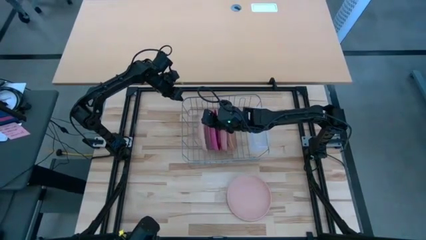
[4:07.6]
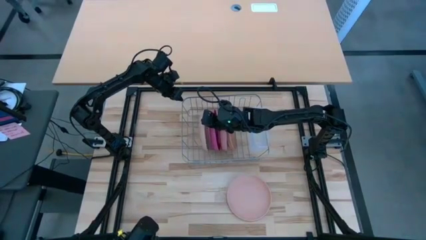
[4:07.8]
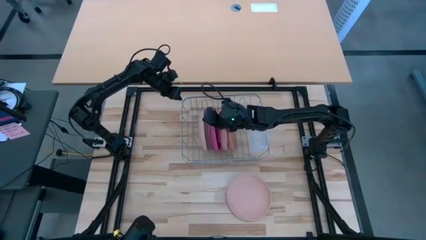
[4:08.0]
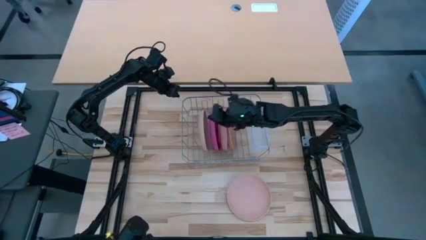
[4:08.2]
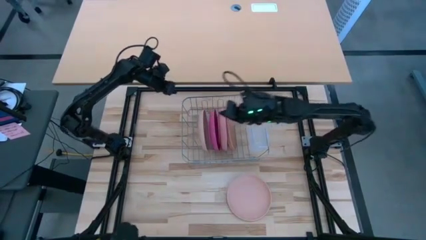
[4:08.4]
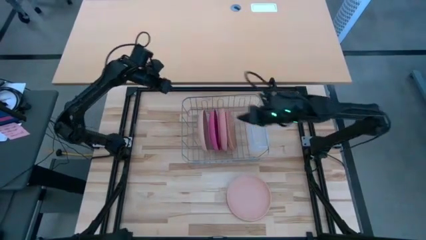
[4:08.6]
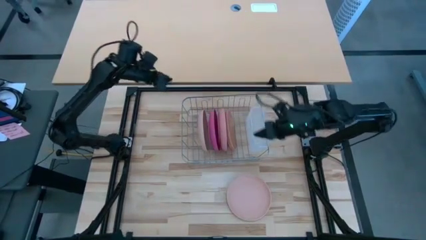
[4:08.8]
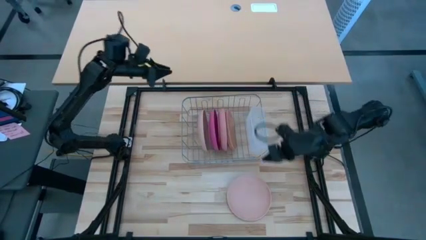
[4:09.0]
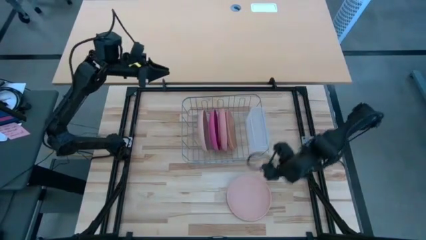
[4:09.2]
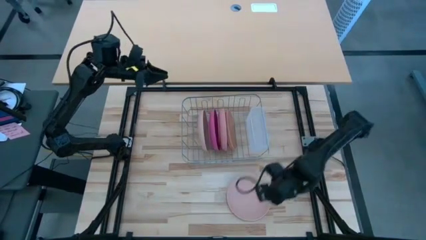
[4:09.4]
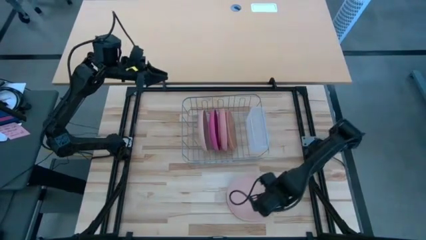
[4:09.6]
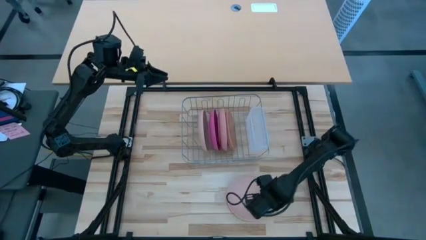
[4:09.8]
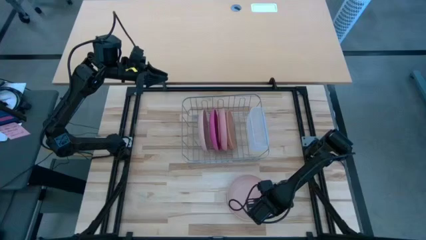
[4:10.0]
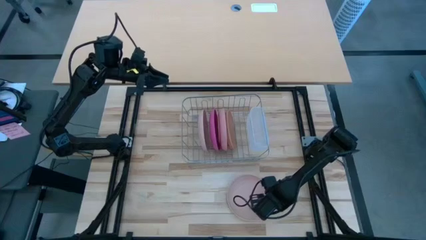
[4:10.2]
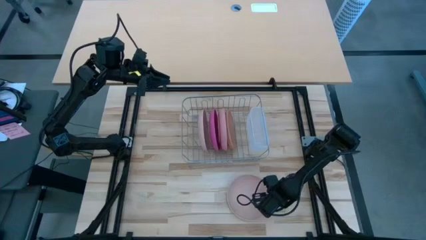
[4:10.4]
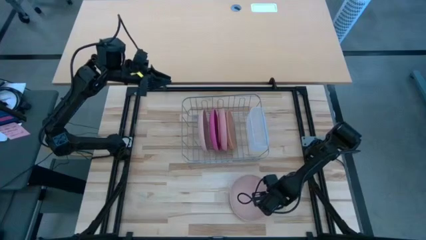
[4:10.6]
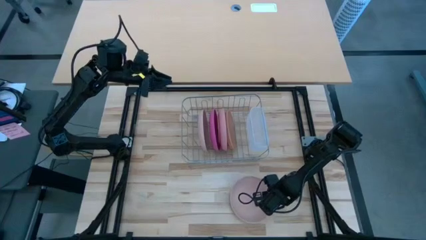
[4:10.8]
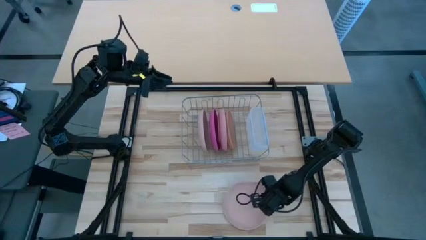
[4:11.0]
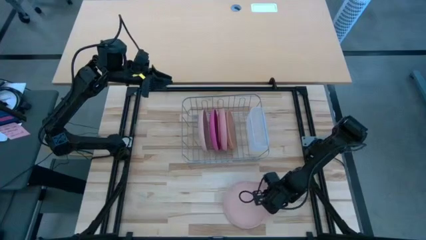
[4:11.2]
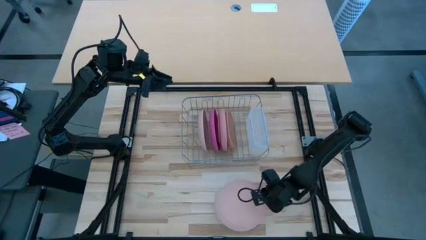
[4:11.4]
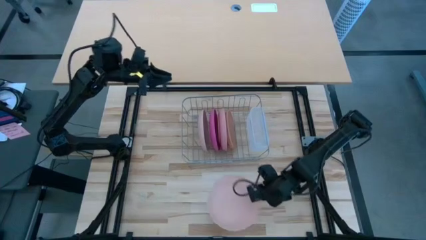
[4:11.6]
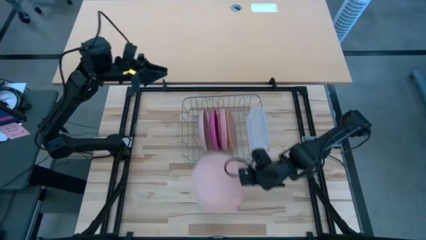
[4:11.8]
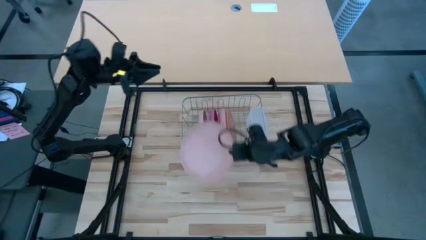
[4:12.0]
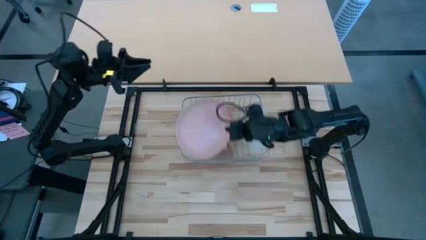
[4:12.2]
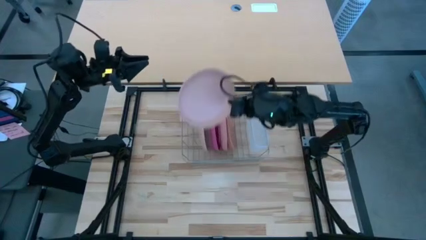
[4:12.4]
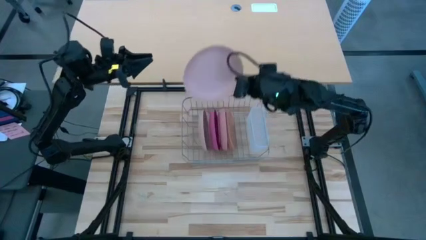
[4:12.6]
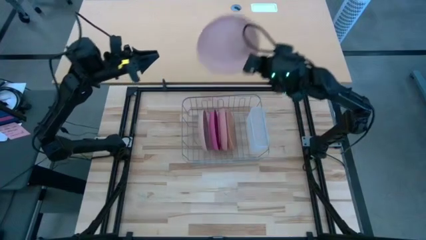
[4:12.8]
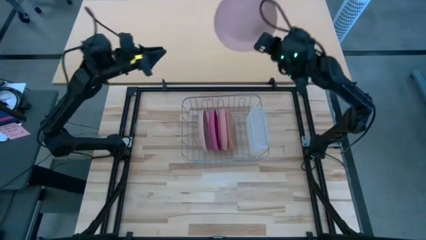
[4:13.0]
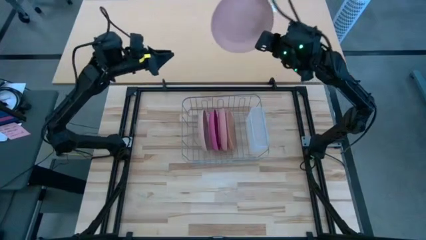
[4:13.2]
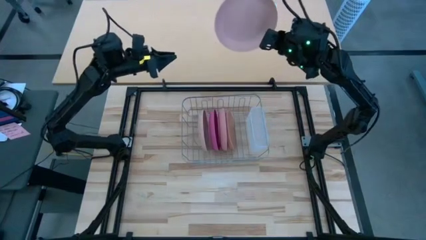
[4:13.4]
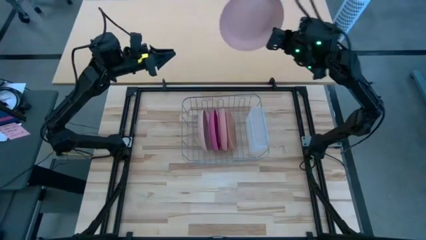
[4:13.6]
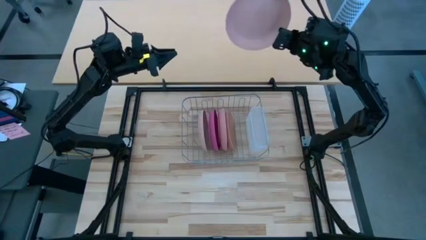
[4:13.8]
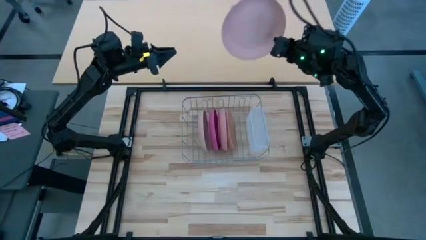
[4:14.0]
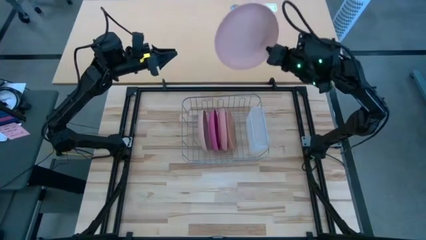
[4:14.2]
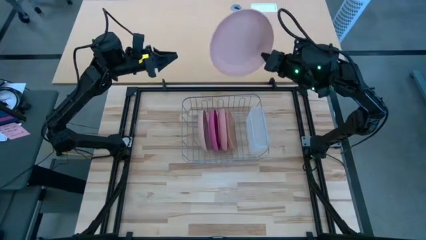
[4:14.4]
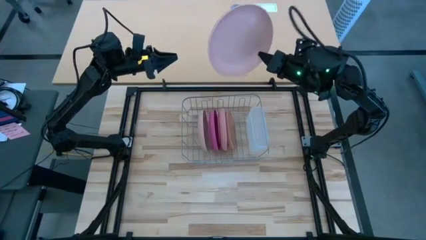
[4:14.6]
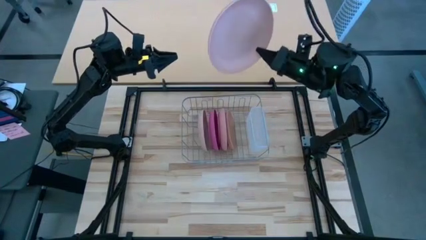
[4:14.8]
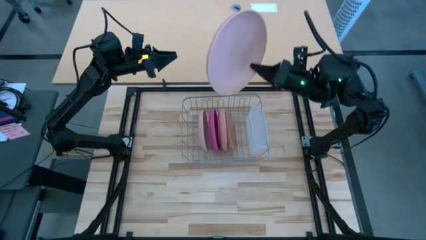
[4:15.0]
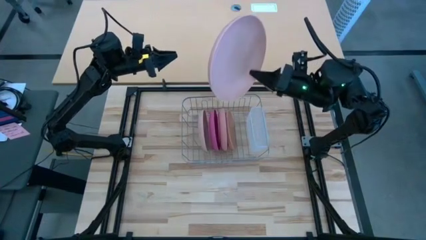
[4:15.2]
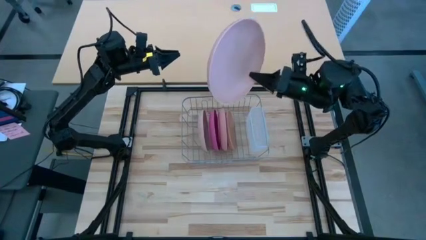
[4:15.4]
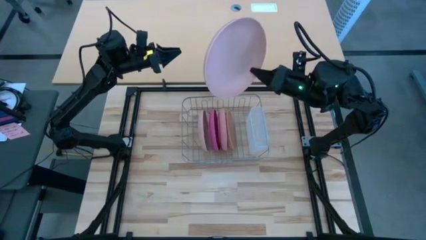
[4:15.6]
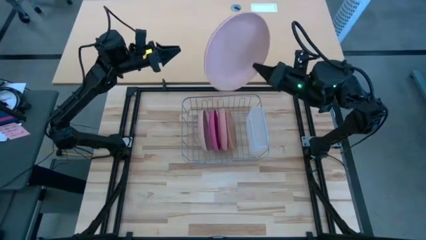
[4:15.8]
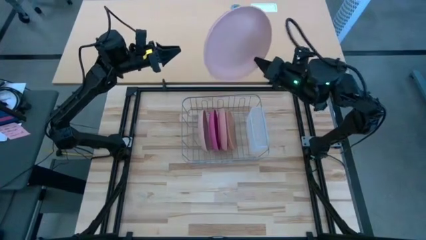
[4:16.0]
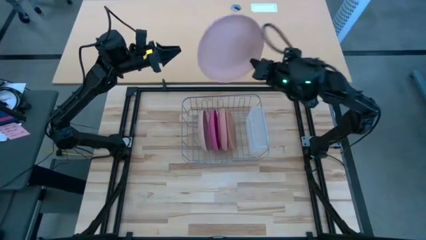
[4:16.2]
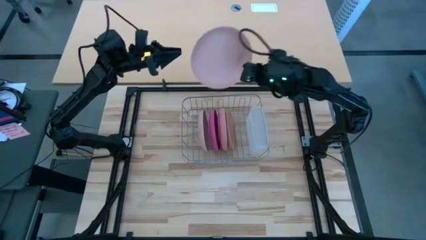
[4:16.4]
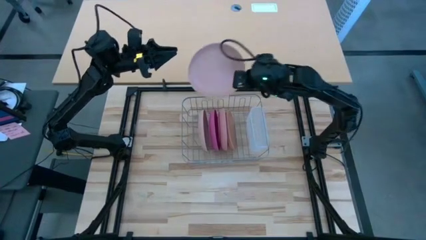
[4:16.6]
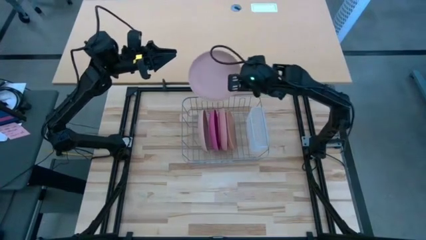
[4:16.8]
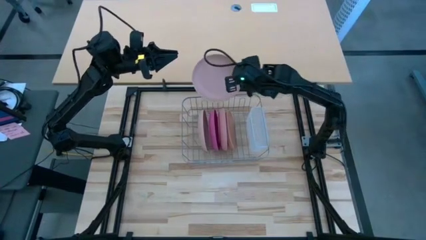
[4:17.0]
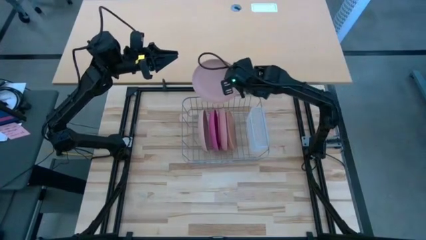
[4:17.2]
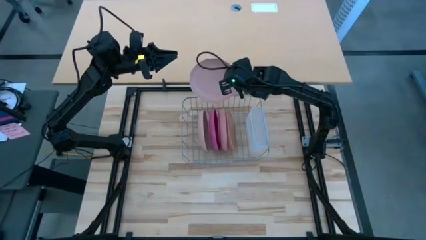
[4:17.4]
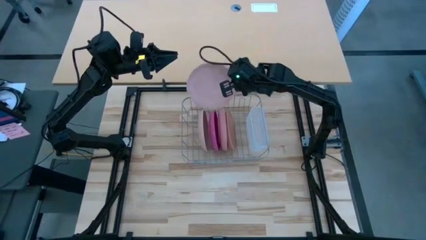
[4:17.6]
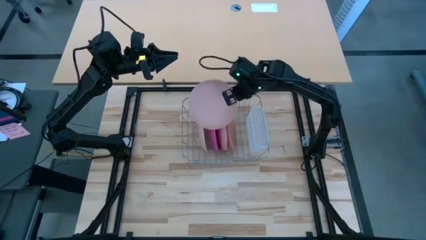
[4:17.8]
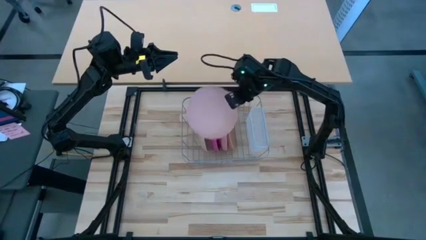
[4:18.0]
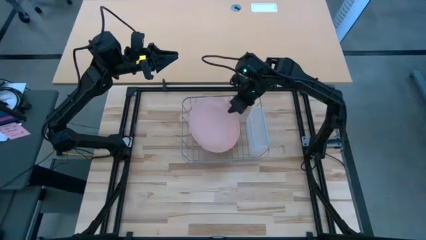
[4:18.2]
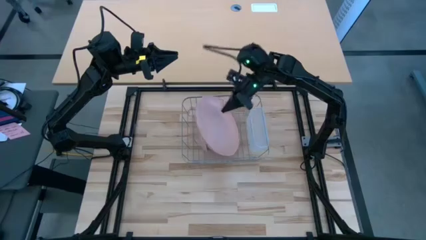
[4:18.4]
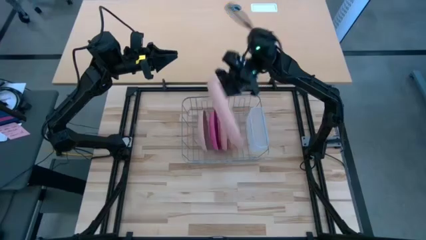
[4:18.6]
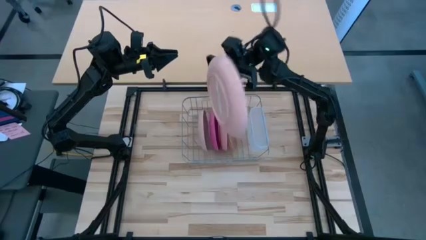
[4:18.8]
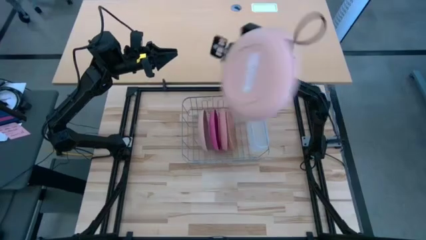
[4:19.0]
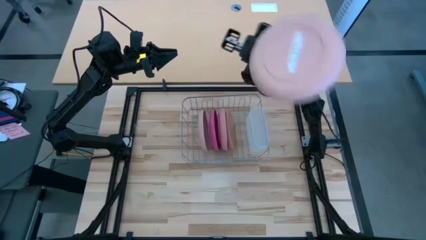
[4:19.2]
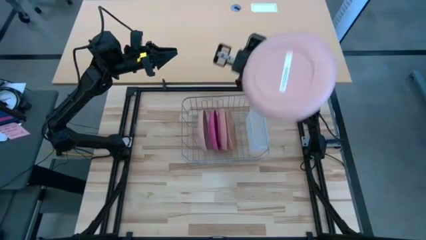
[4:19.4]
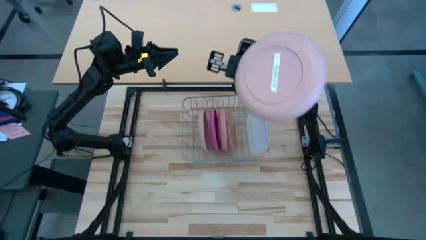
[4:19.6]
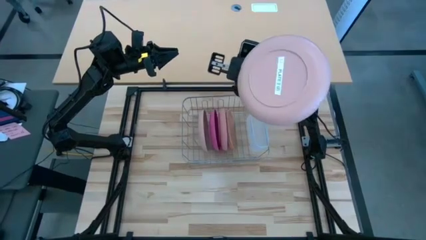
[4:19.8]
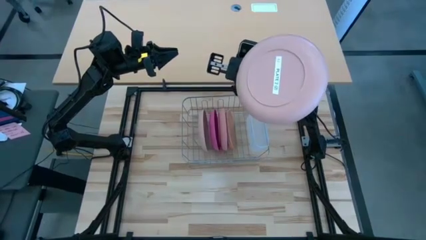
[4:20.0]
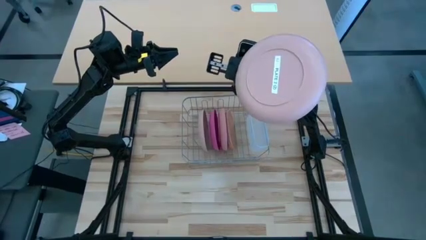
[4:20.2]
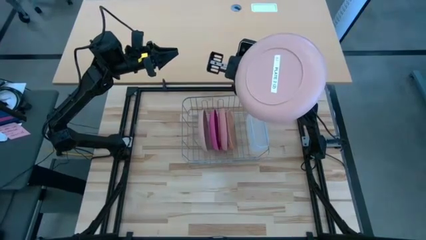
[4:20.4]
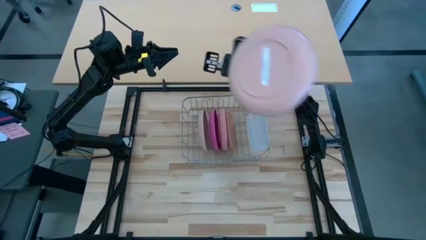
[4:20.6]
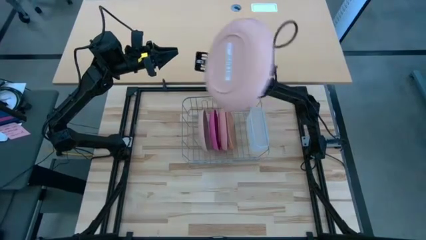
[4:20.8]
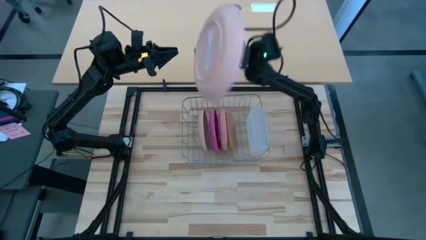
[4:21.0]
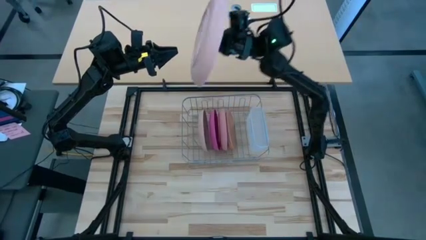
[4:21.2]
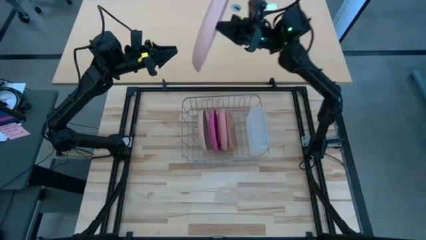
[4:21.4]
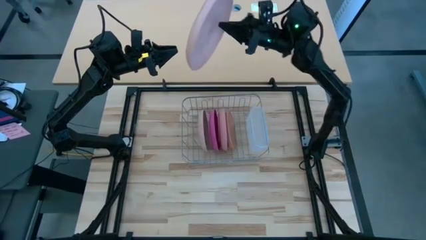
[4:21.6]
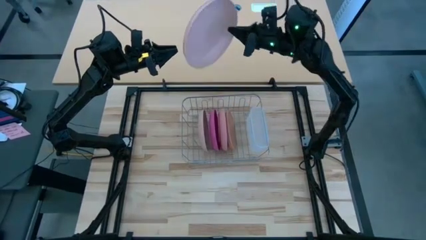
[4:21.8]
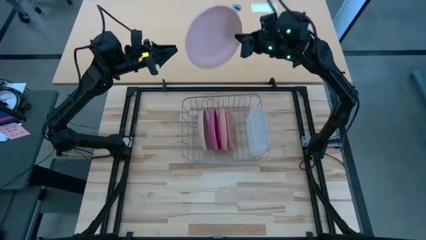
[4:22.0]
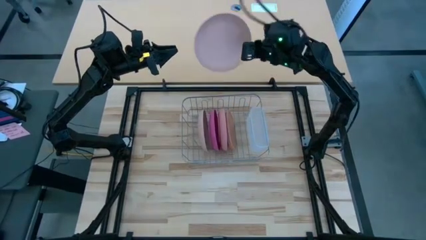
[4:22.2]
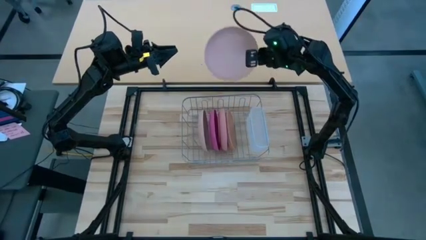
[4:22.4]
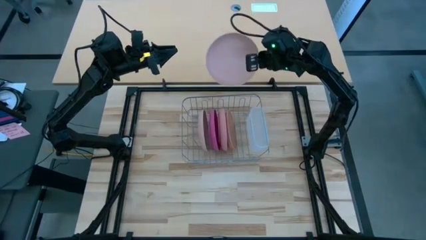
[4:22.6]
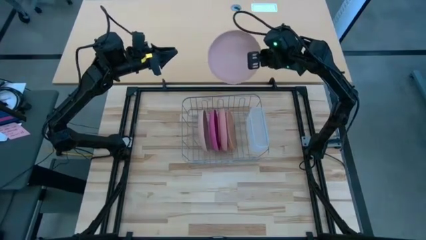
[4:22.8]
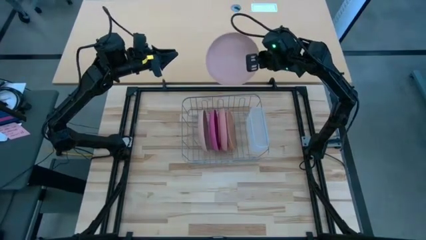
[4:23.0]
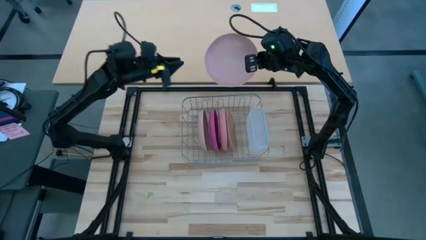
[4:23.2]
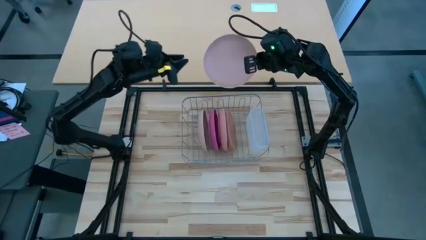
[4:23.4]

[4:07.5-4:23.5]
Task: Sort dishes
Put the beige plate in the dish rack
